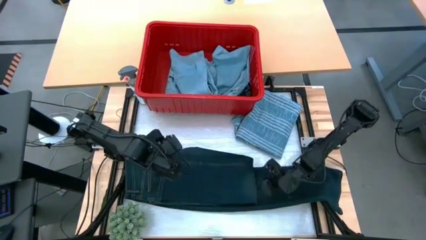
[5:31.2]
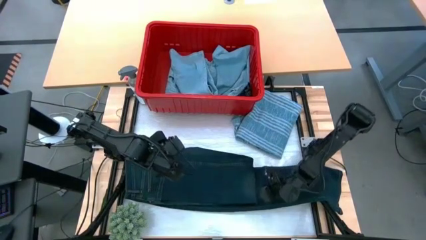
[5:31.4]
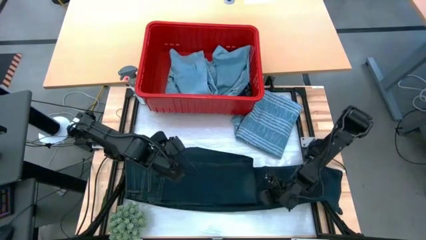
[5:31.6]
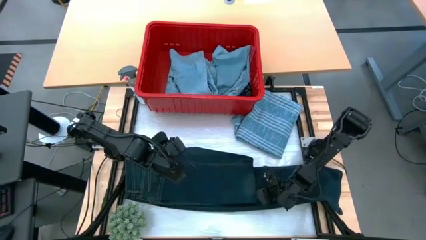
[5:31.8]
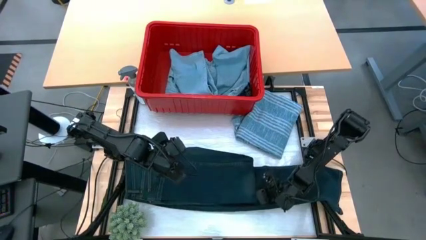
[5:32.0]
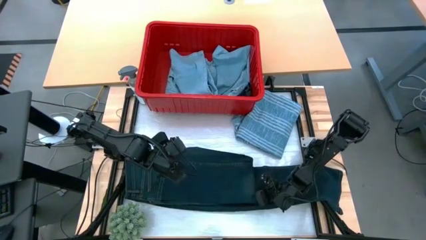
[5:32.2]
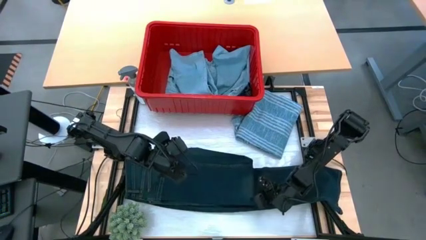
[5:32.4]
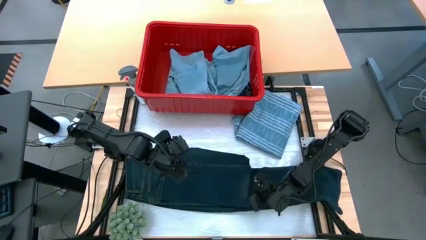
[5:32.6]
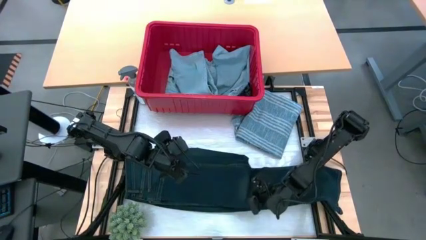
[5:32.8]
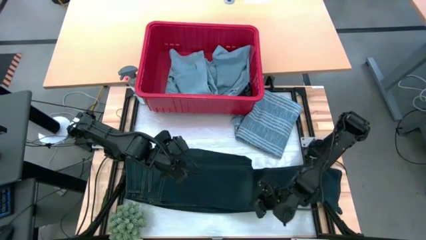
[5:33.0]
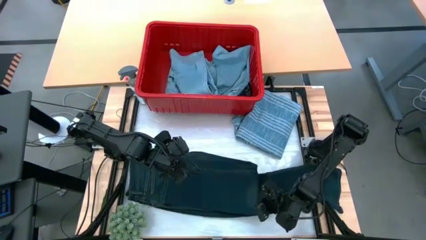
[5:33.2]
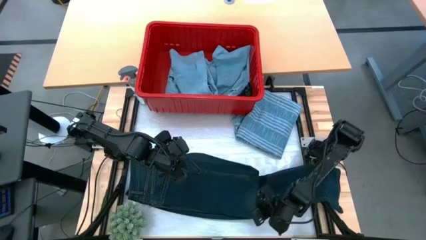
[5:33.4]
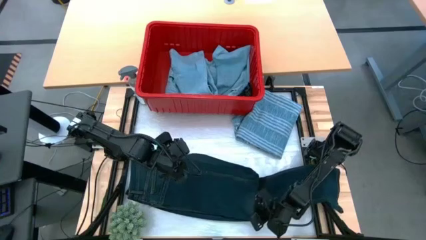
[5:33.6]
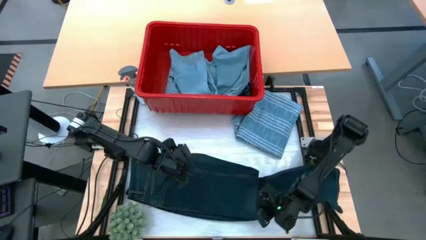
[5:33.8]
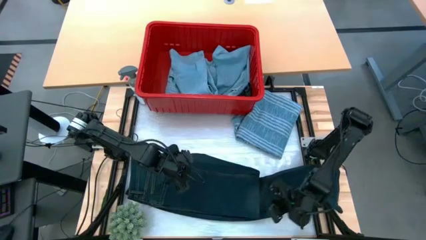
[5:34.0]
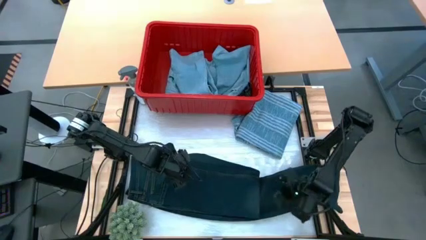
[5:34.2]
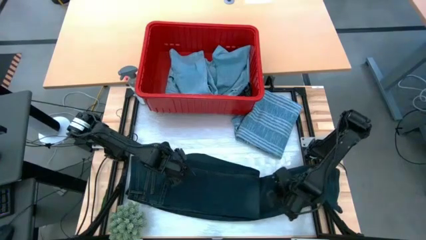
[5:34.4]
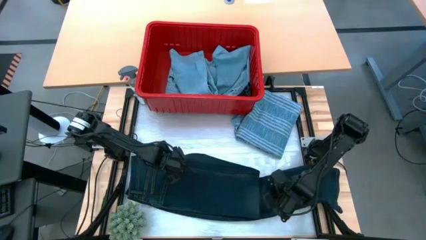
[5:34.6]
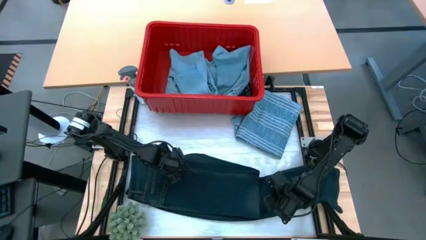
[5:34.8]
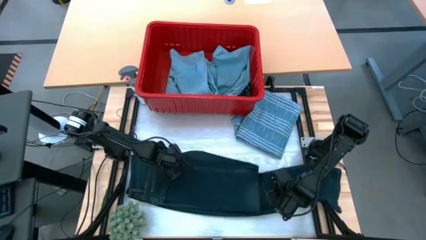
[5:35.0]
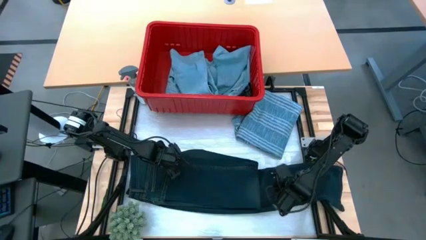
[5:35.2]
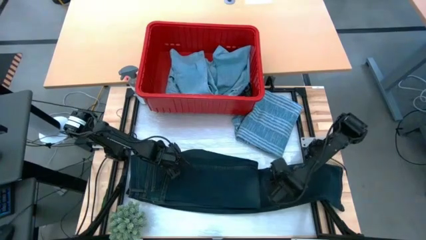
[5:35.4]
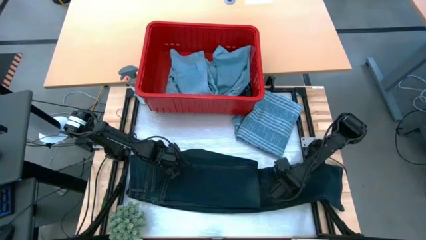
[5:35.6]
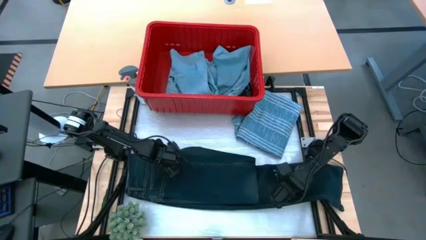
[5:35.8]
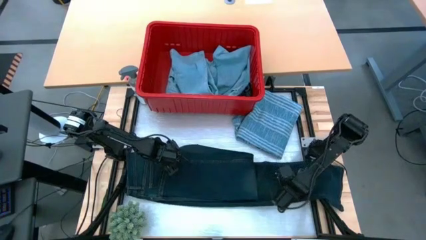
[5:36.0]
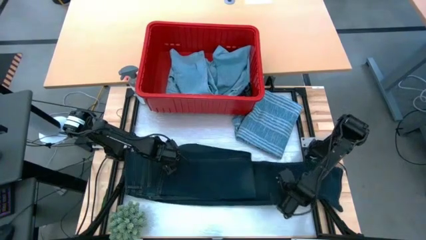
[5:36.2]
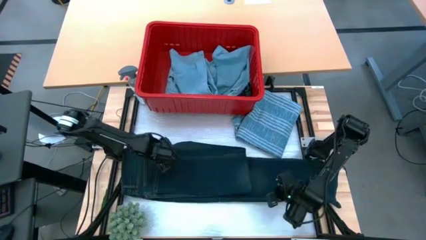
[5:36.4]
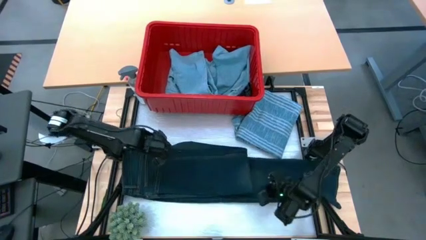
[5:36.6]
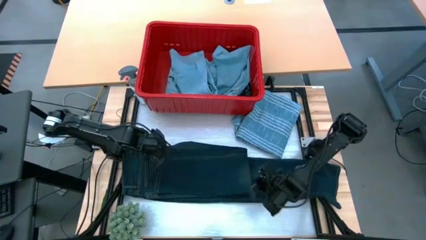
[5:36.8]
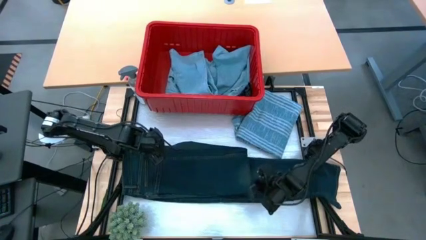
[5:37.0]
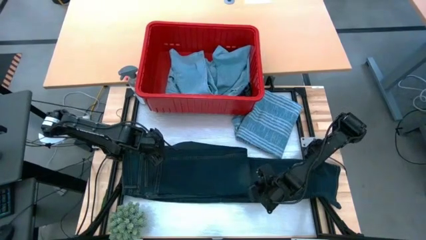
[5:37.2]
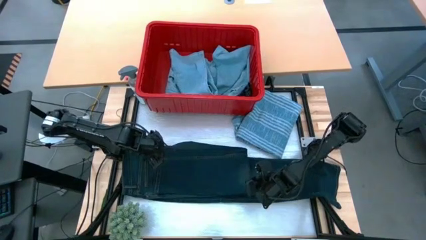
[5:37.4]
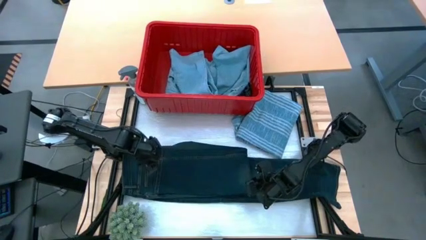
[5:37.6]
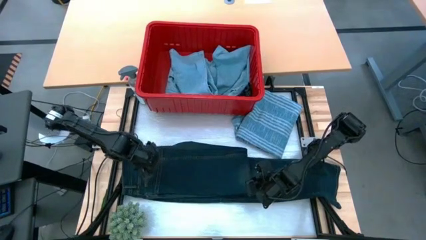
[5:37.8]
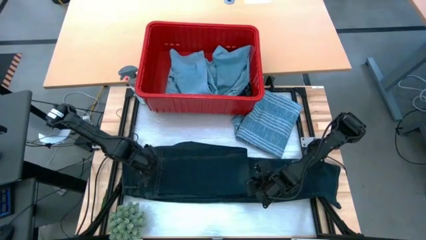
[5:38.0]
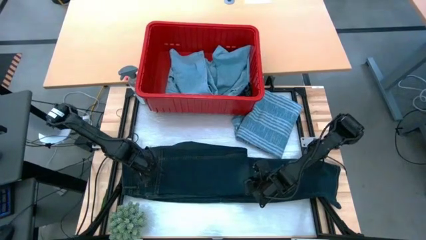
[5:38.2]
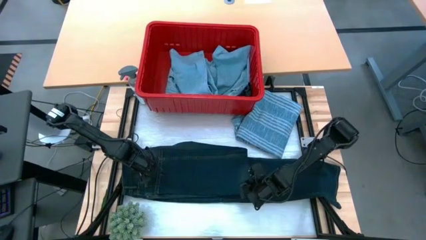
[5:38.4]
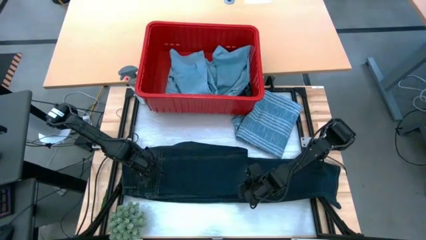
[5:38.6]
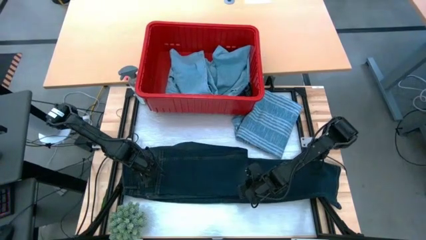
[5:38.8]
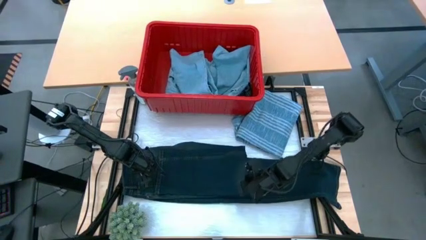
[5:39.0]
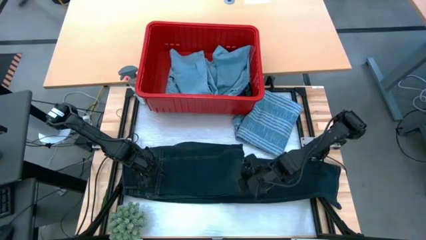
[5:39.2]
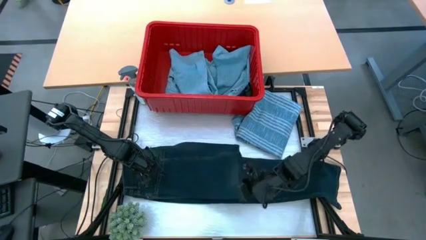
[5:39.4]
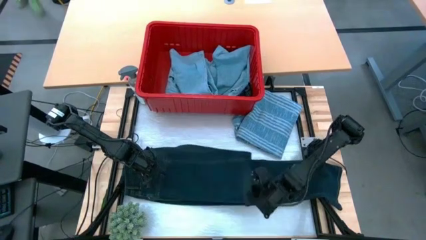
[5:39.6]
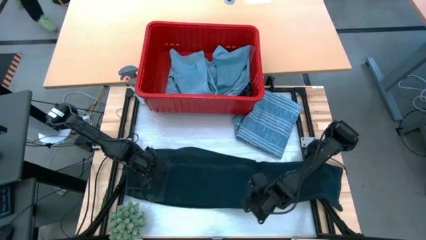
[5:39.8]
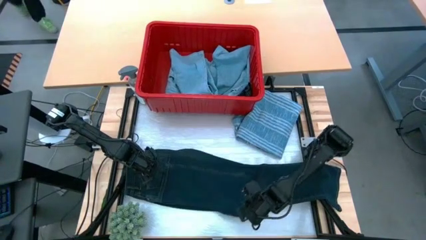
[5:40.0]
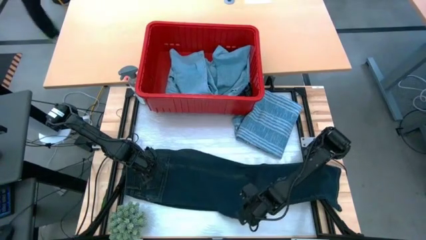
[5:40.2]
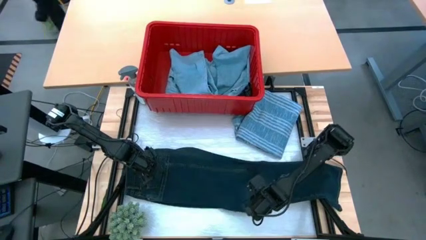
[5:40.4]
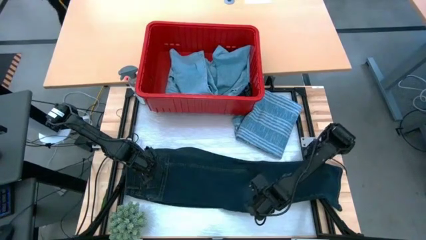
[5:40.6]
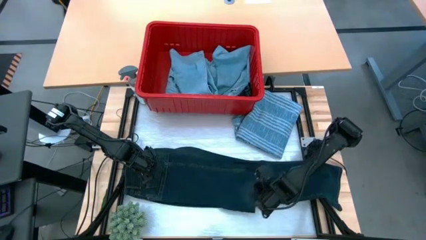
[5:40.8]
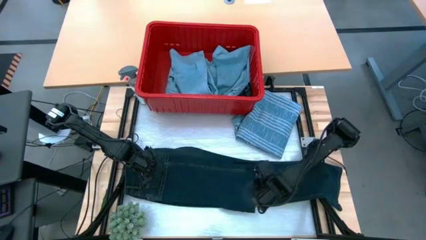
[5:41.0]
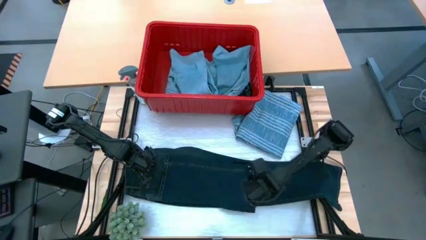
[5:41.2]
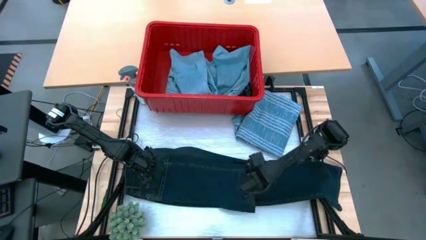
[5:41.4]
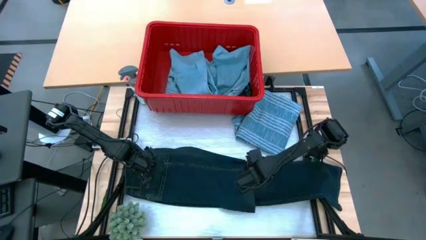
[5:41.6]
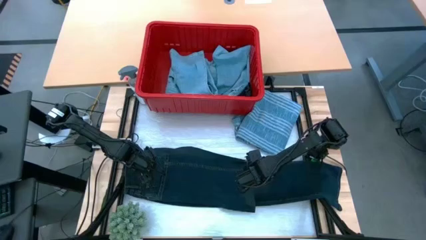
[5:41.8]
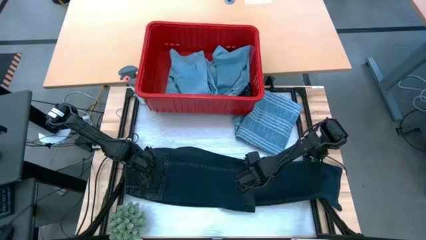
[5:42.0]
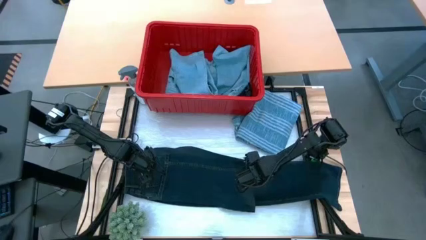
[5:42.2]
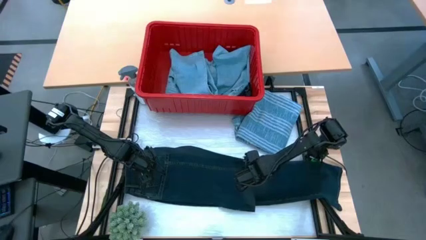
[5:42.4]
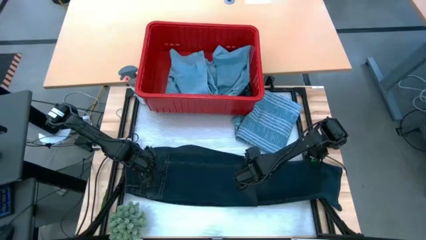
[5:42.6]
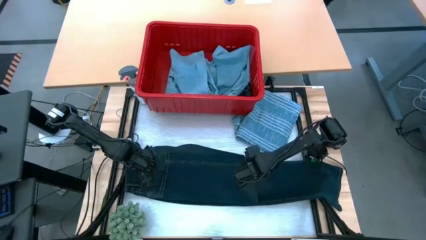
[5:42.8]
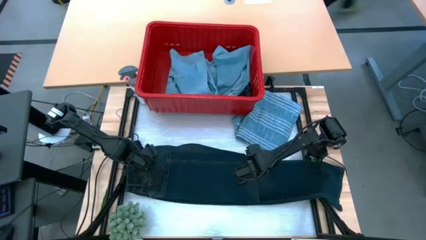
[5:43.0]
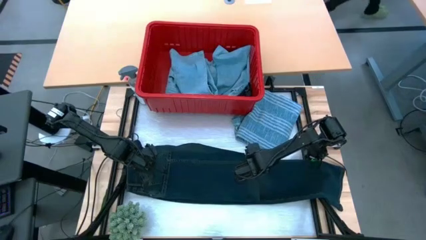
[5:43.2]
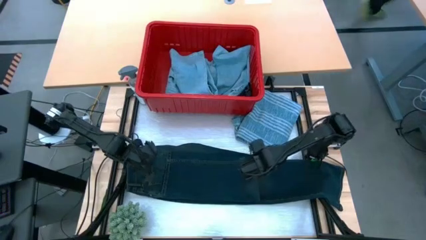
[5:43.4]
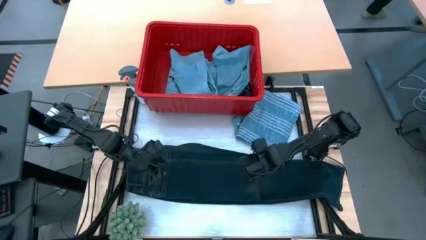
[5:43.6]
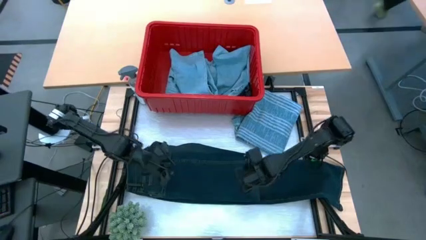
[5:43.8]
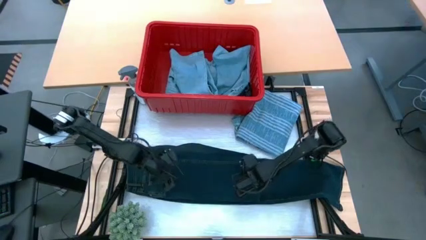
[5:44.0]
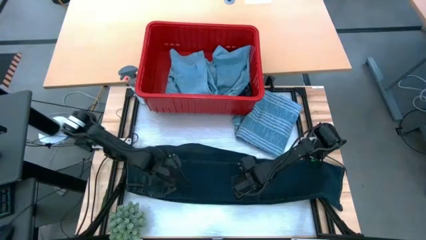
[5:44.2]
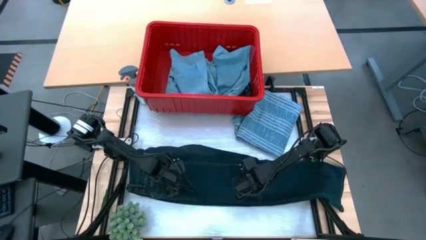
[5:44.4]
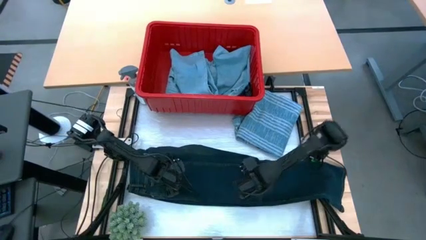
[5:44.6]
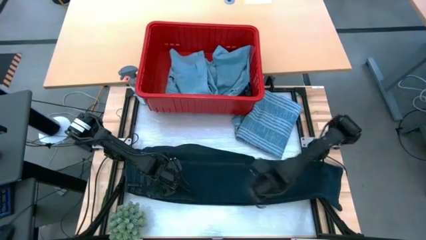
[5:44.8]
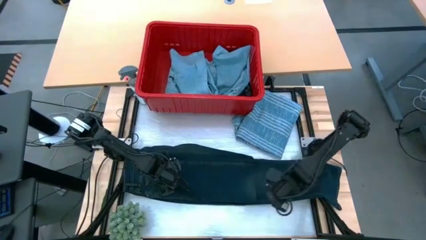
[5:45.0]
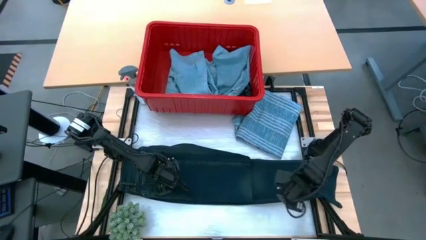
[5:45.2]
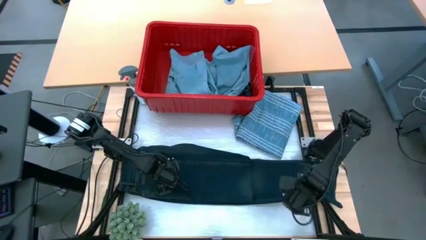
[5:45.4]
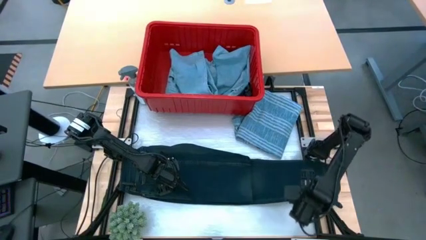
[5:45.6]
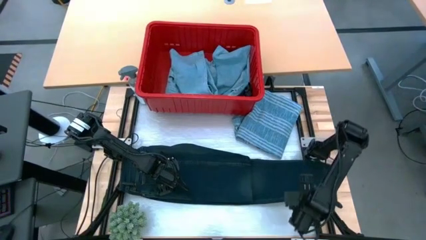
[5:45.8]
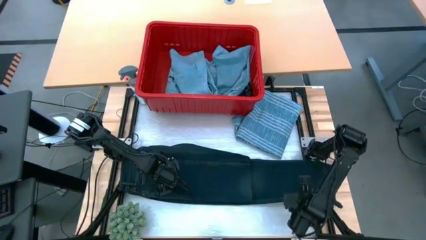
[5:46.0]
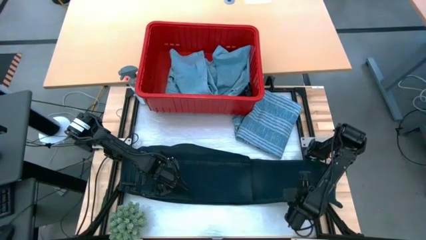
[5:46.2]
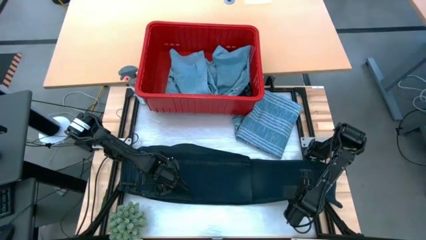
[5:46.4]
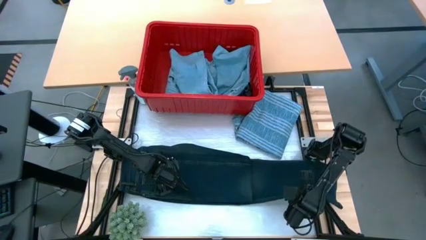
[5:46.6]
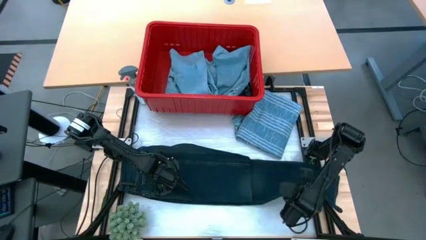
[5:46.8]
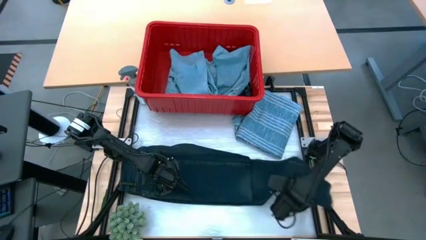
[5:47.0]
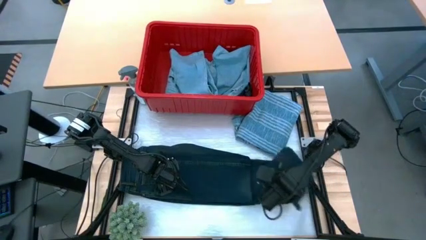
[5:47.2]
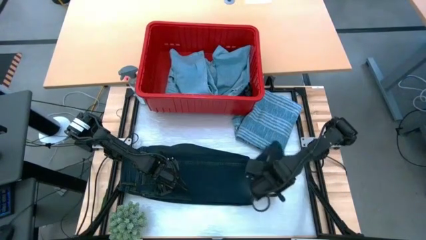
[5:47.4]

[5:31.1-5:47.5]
Task: Fold Laundry from Bin
Fold the black pants
